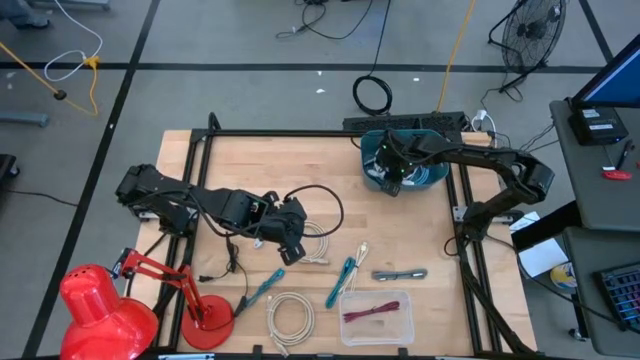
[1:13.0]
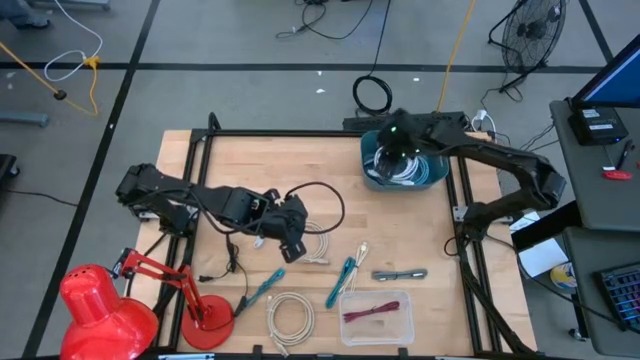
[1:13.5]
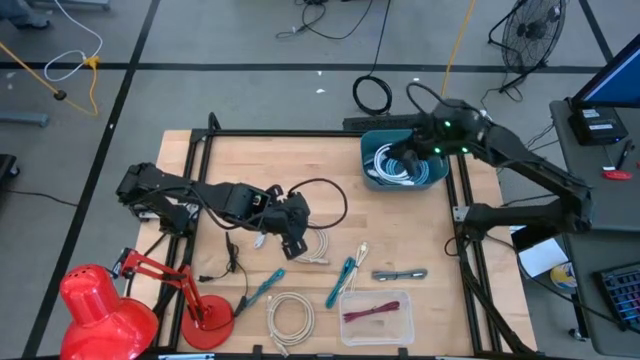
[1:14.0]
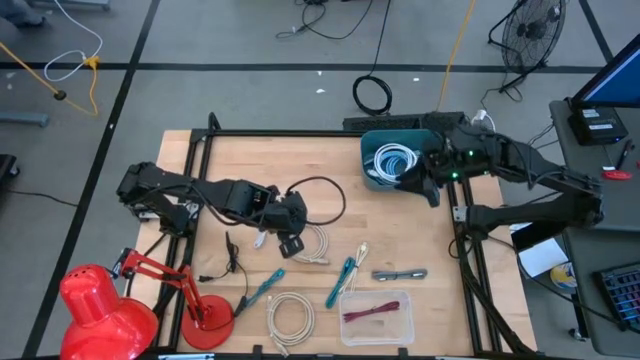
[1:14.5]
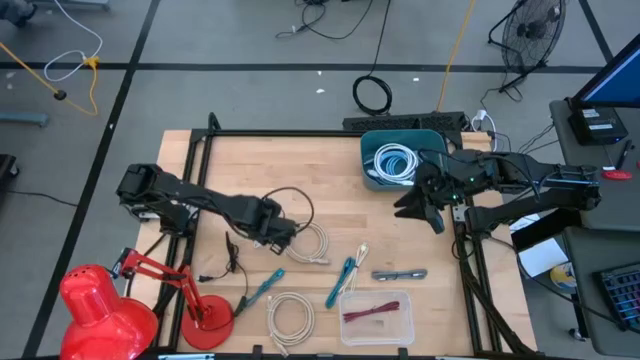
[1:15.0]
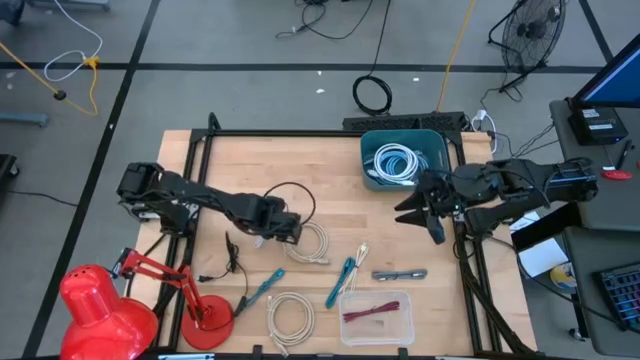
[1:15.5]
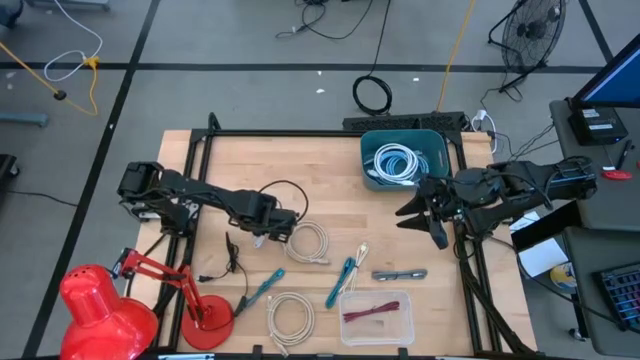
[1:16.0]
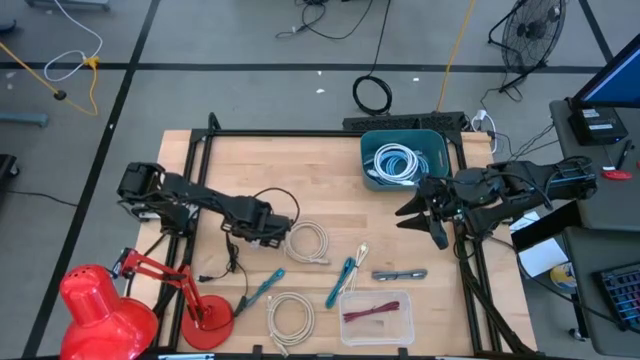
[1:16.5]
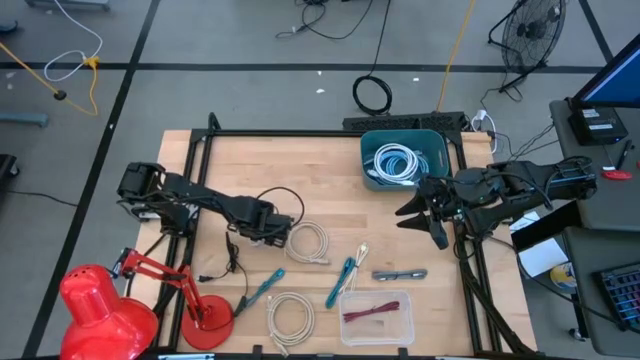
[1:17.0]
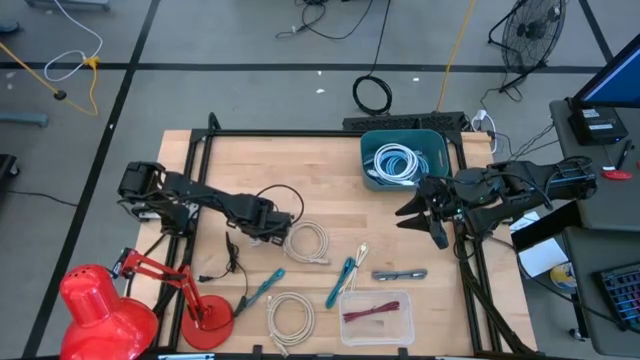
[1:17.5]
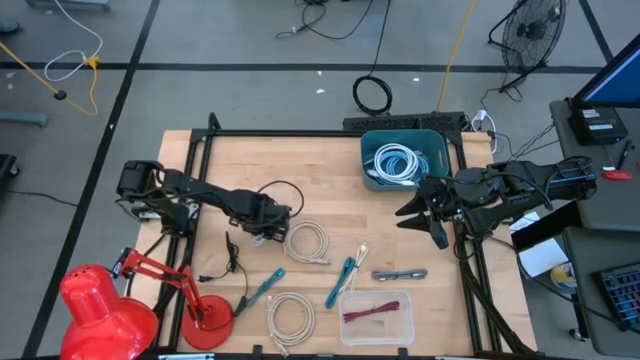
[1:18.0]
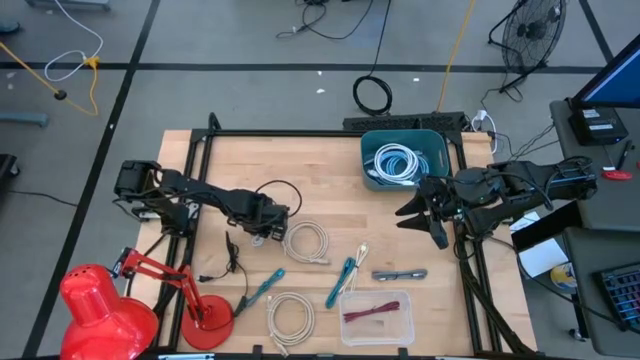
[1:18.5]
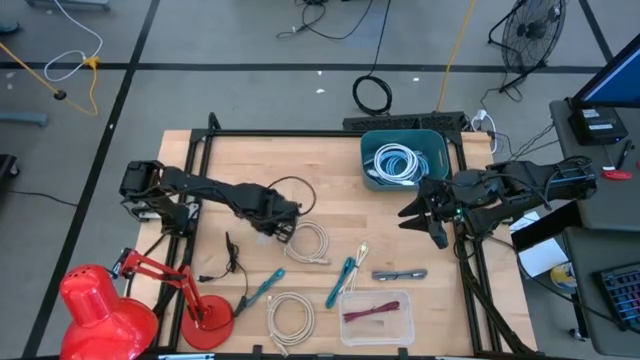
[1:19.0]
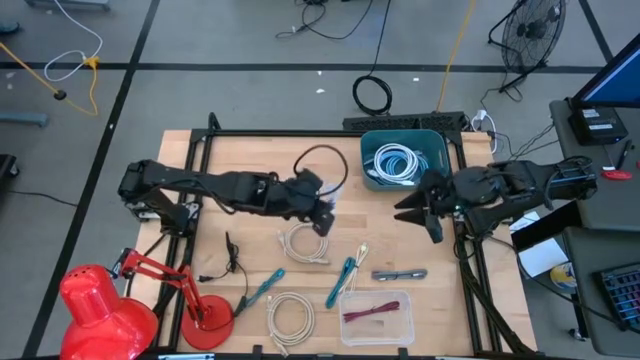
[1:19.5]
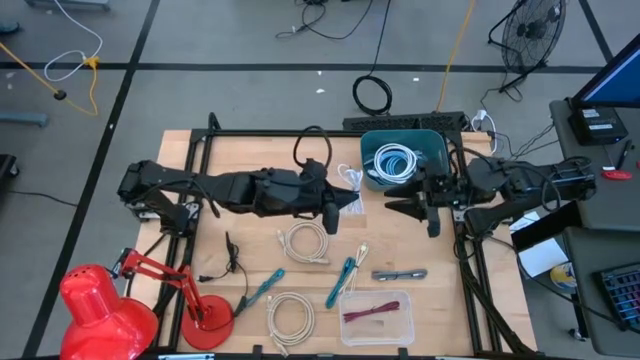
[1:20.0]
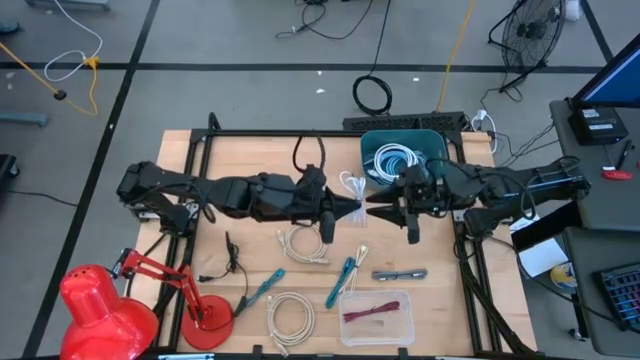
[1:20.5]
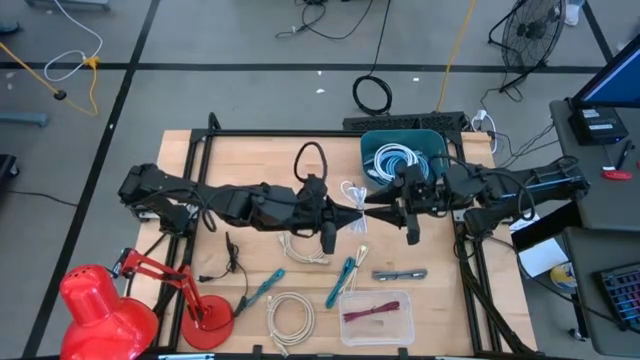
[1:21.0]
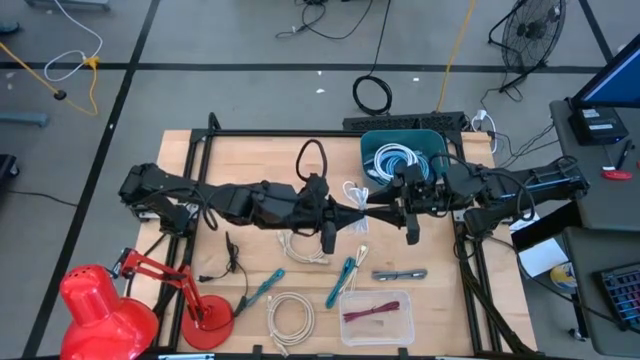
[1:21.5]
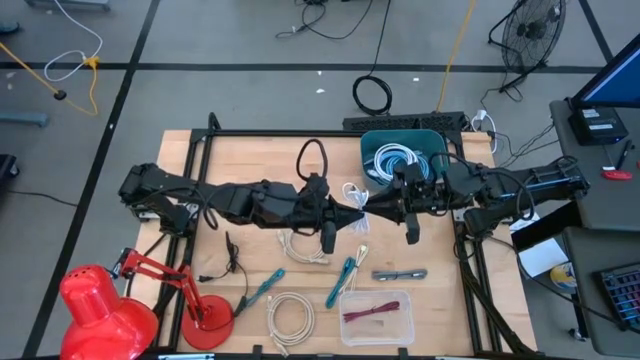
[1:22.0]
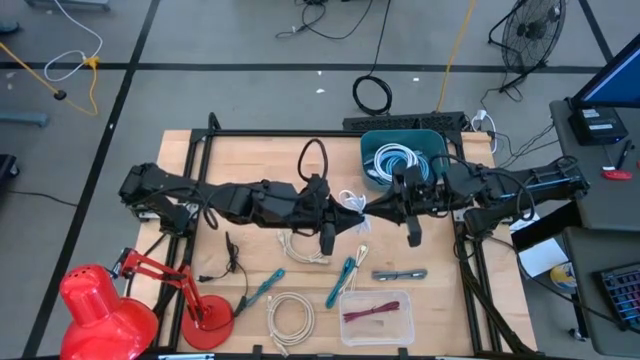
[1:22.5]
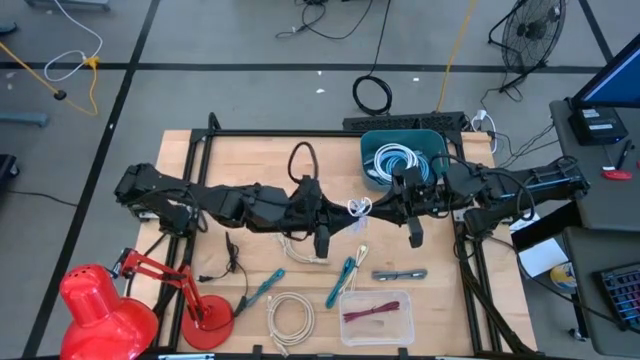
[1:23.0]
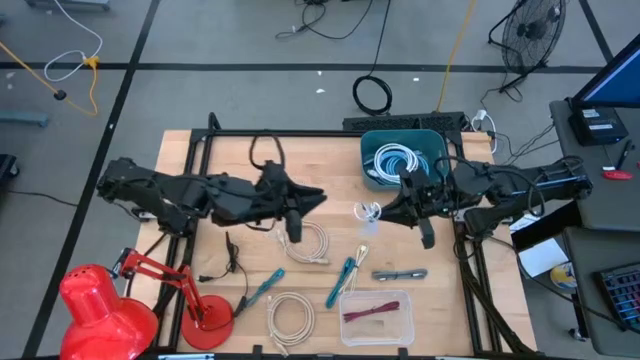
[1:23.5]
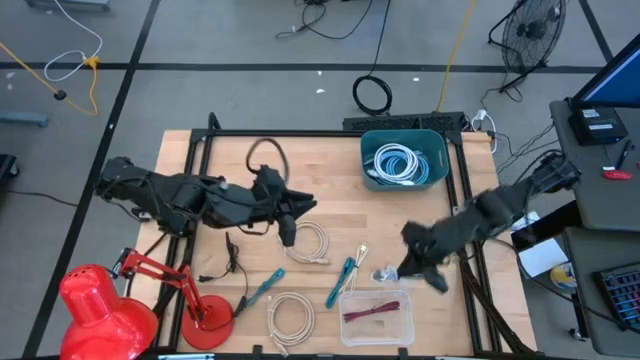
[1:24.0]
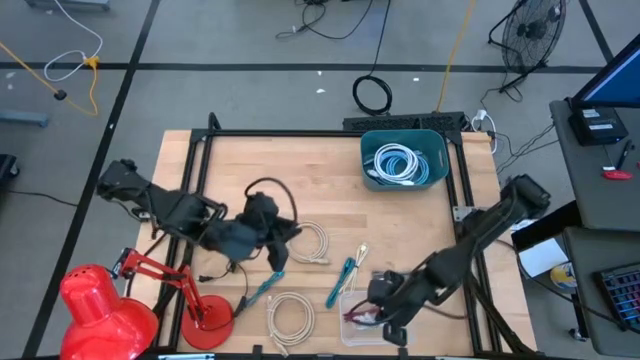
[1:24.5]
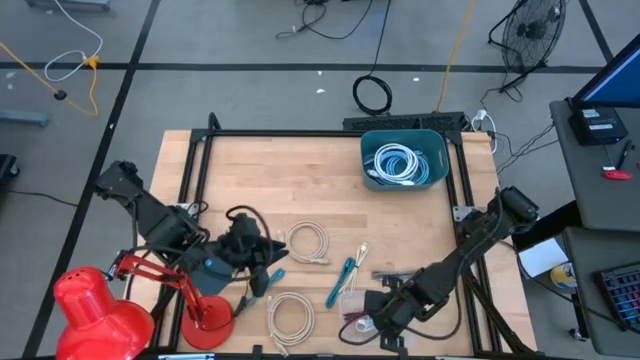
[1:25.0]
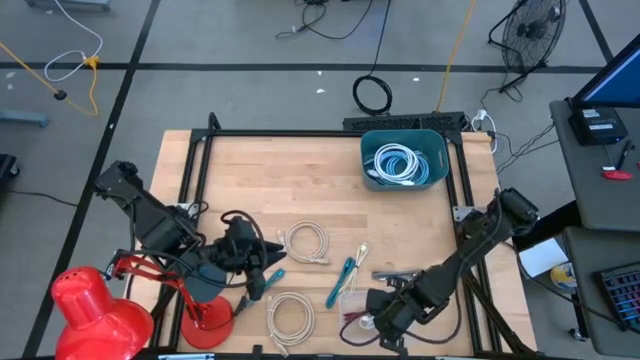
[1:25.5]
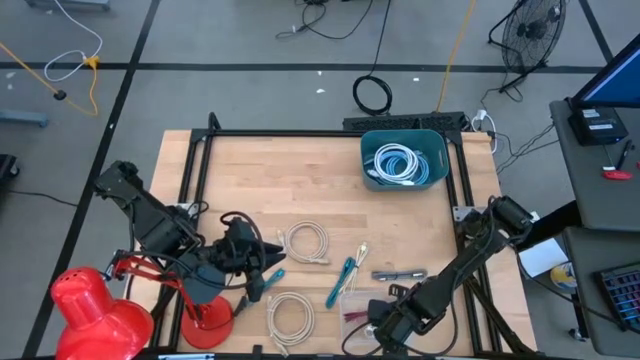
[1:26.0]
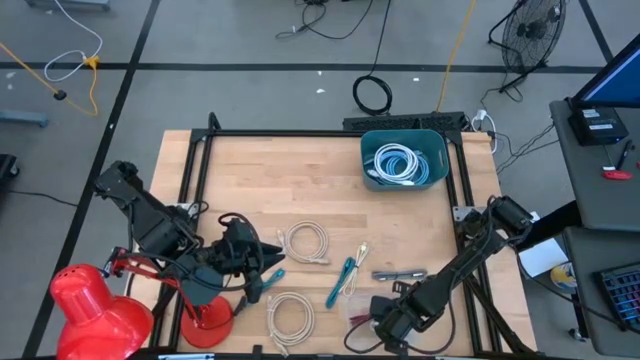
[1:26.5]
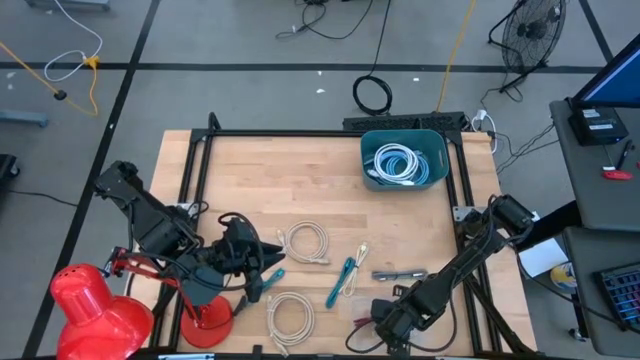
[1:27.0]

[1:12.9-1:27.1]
Task: Pick & Place USB Port
Put the white charger cable into the transparent bin

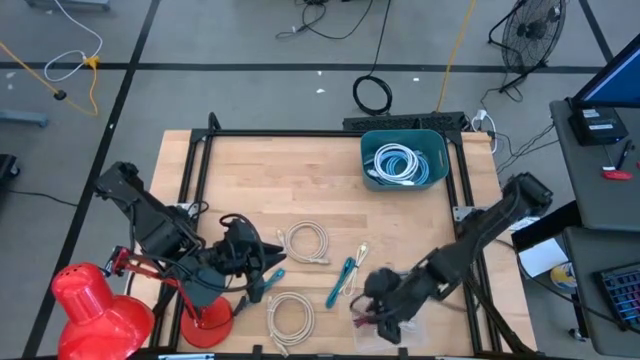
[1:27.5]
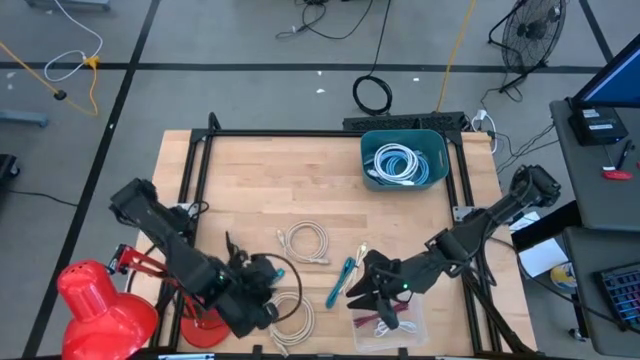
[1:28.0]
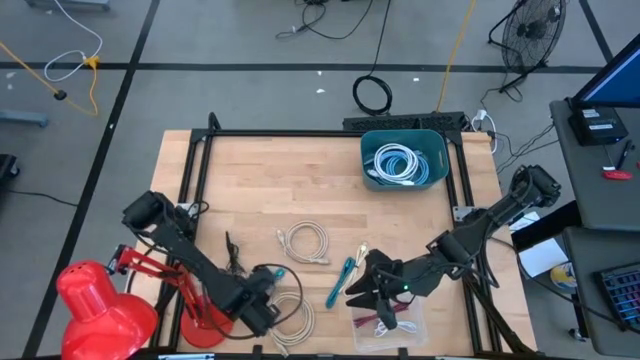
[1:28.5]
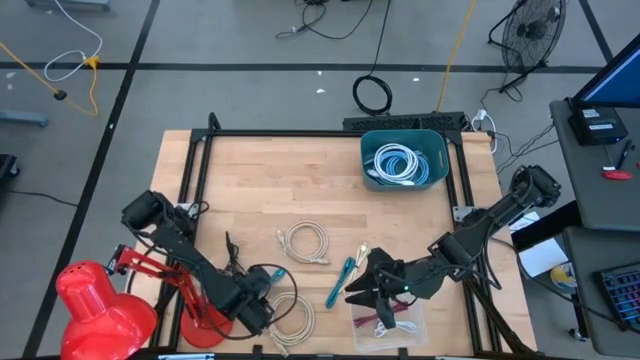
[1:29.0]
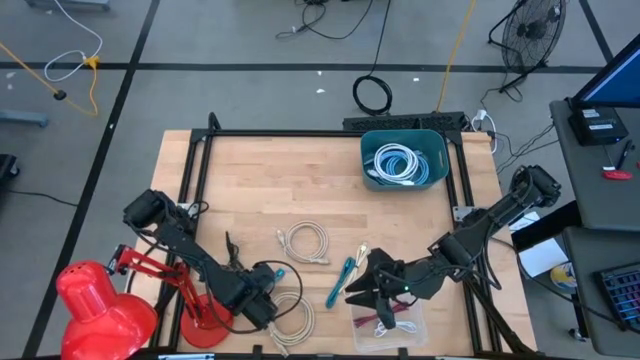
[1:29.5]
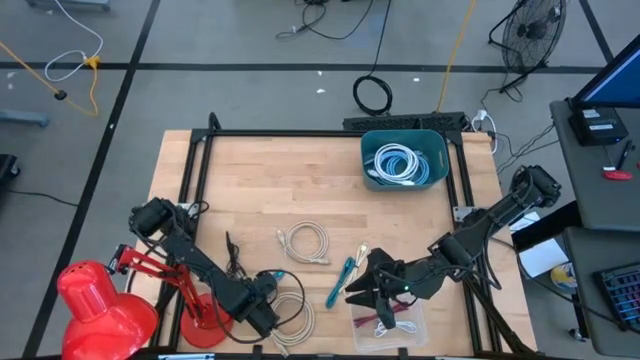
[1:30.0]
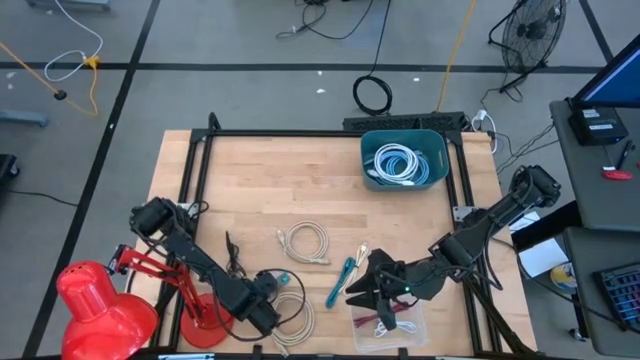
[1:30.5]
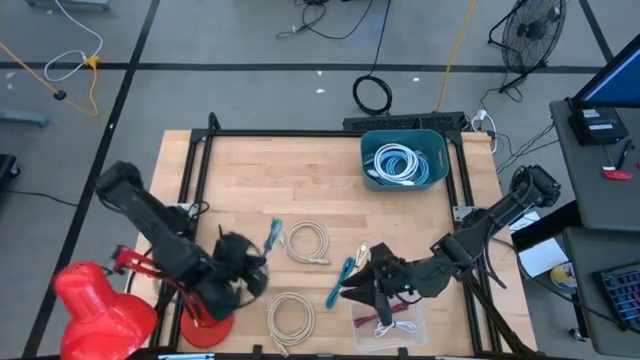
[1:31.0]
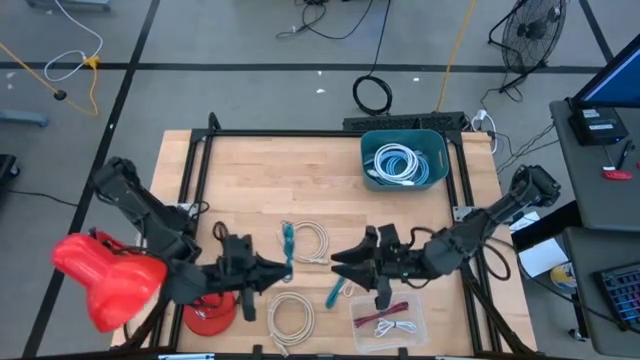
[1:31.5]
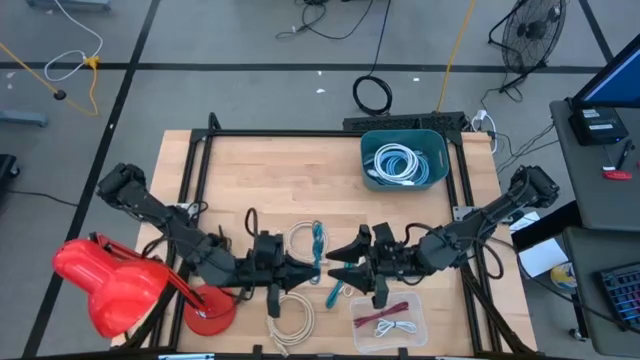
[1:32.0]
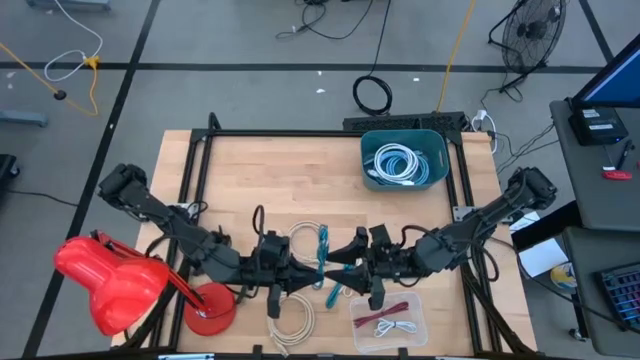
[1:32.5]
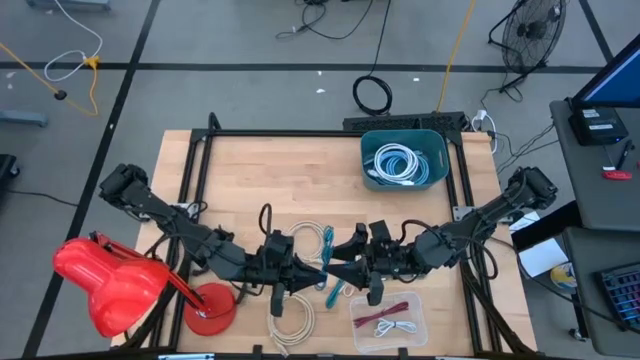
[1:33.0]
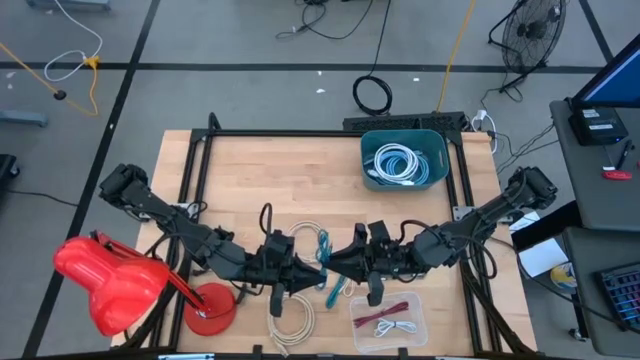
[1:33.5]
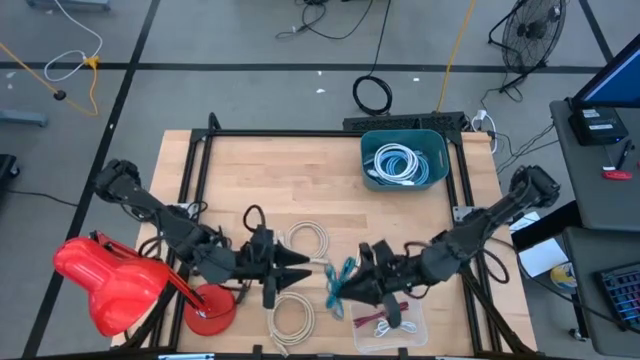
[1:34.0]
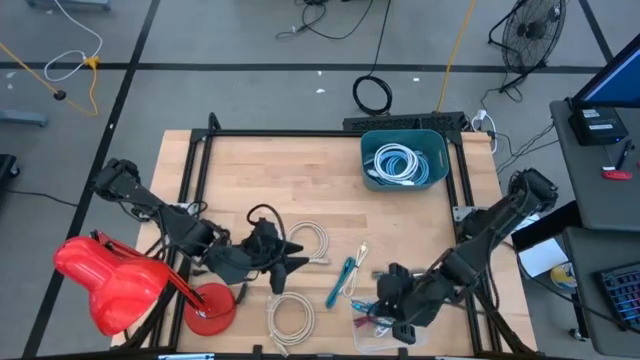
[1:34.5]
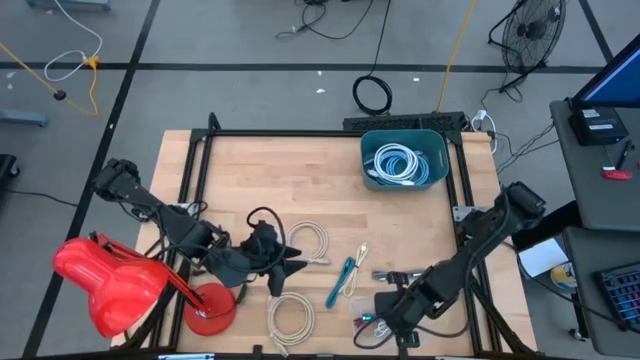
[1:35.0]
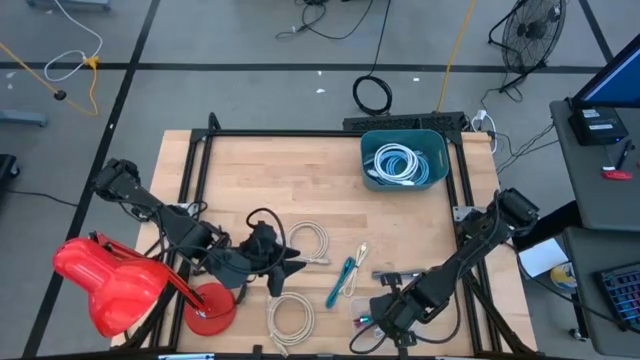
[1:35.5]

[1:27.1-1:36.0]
Put the left blue charger cable into the transparent bin
